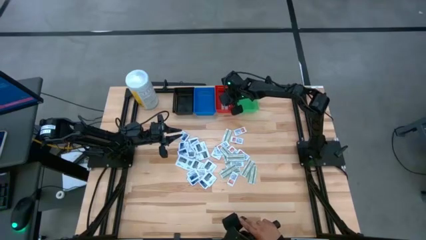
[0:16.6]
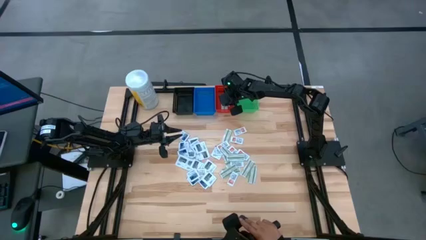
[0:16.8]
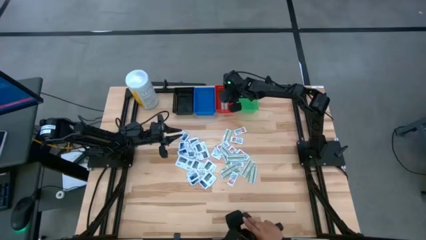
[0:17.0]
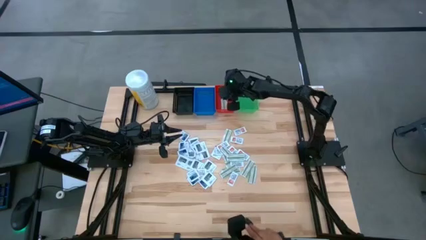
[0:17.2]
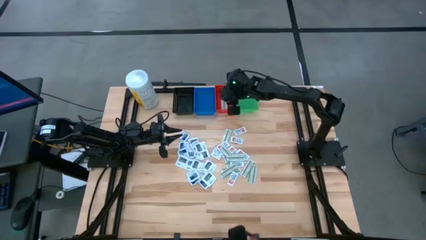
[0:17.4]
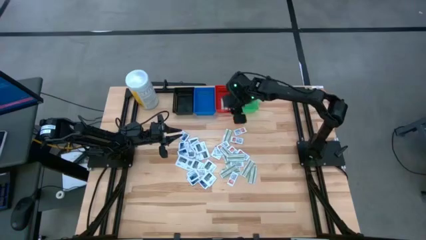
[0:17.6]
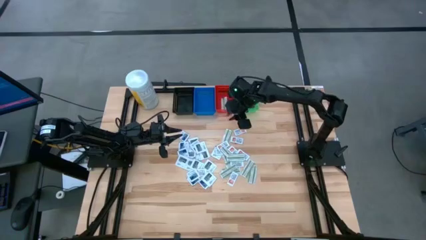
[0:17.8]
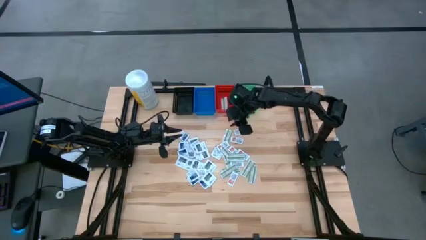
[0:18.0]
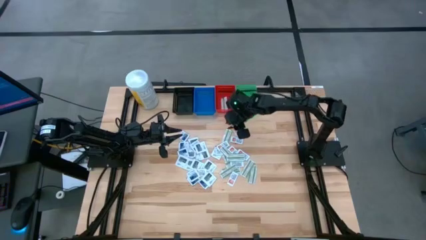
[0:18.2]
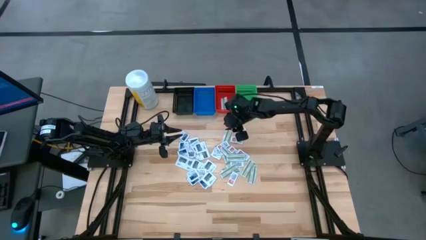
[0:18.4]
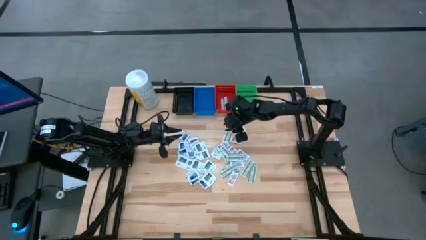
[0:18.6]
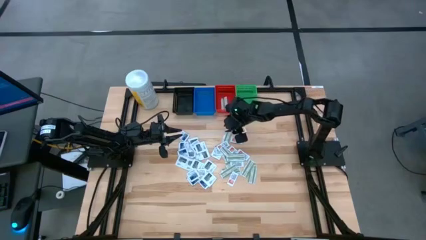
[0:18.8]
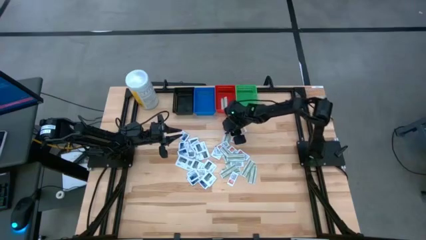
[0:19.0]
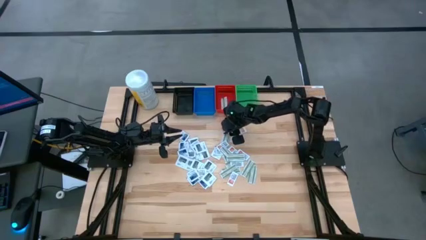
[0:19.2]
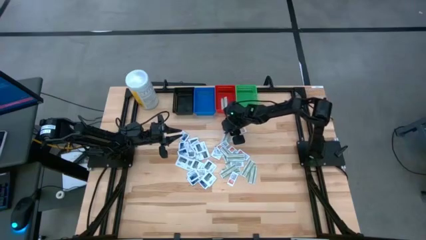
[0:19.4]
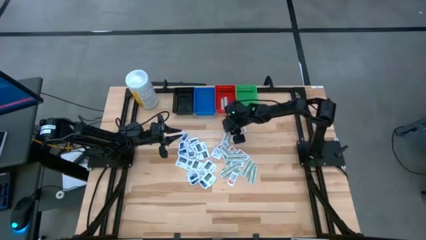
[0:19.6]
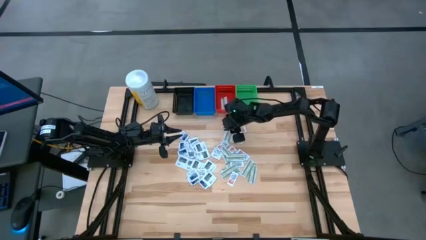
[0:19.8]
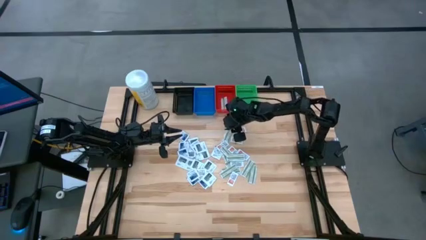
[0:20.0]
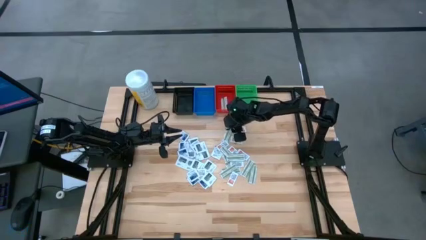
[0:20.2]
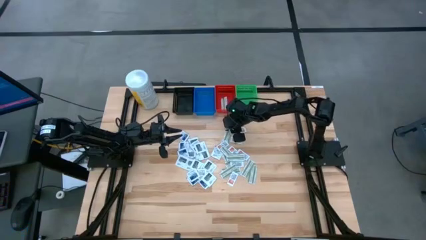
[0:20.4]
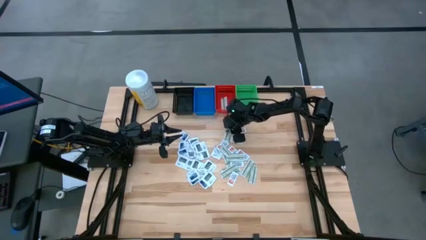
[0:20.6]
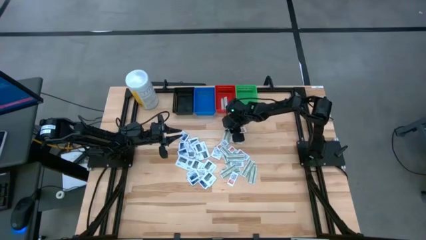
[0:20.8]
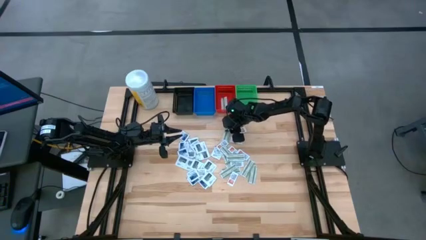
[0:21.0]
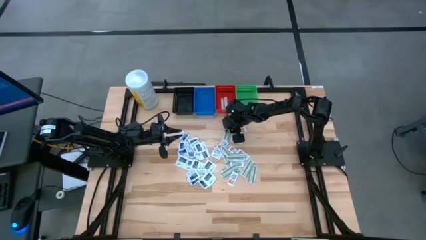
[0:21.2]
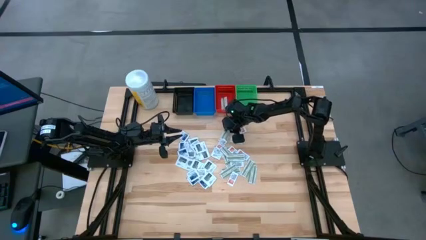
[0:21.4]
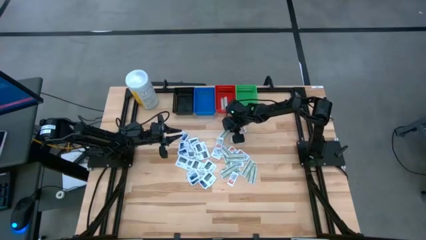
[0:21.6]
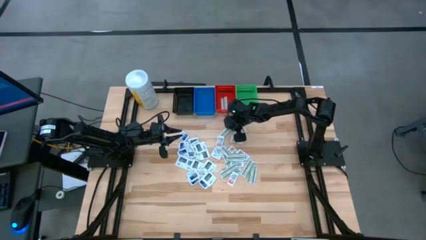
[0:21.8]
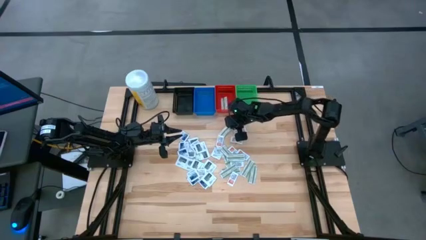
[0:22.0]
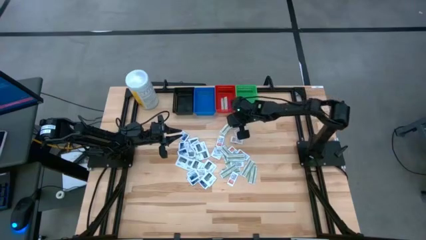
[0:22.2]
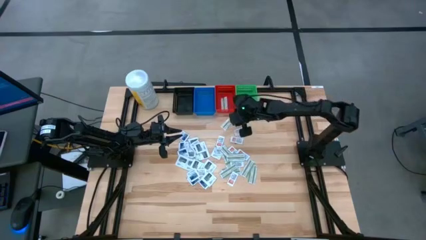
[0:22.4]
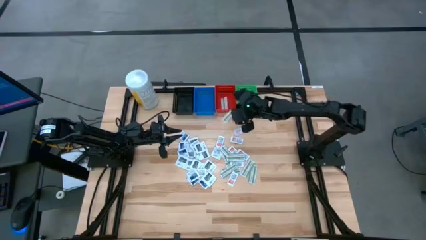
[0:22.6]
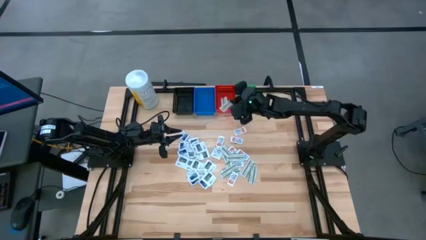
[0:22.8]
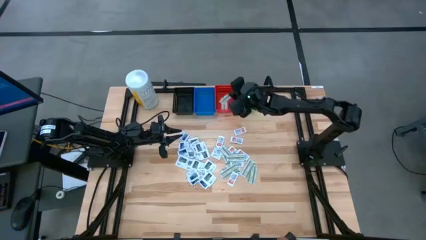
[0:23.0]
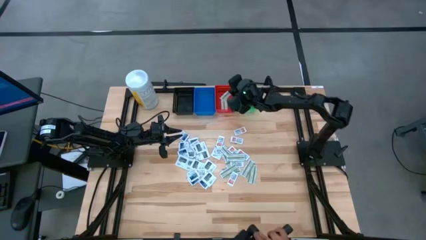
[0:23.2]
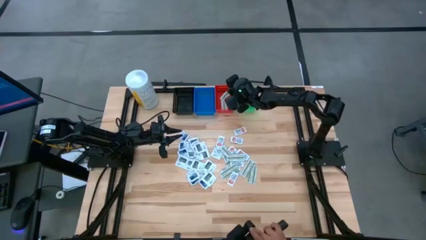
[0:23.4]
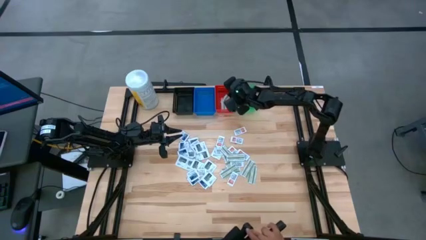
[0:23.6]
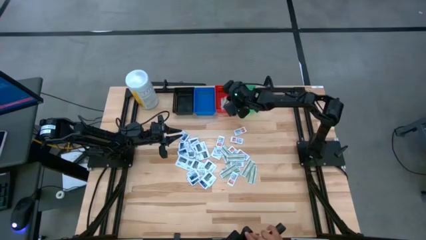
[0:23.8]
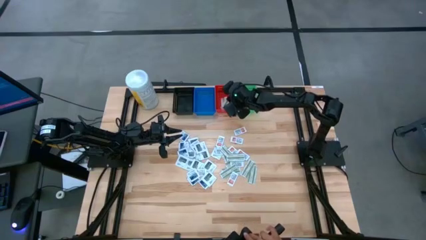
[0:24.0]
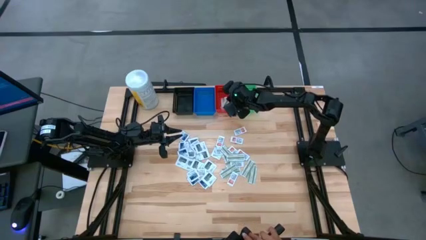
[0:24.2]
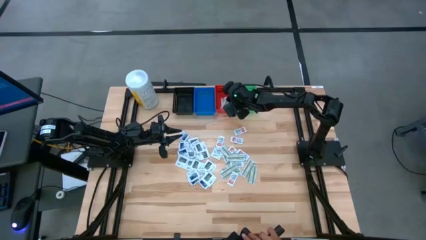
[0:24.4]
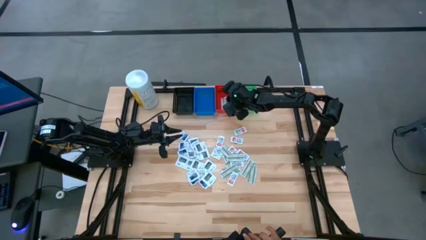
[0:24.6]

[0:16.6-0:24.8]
Task: Pick & Place First Aid Supplies
Put the green bandage pack into the red bin

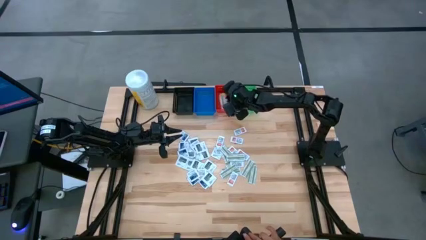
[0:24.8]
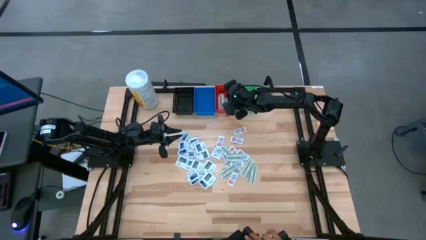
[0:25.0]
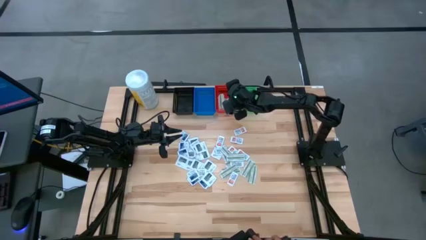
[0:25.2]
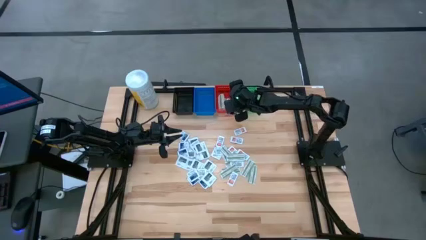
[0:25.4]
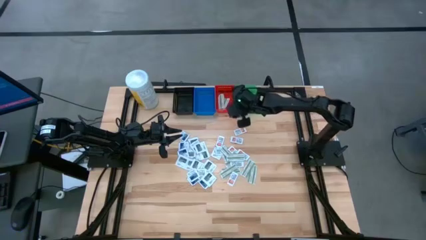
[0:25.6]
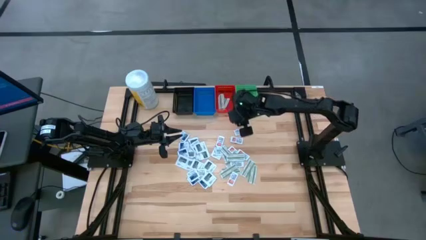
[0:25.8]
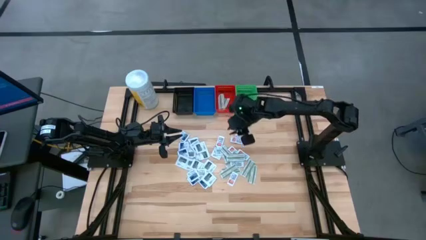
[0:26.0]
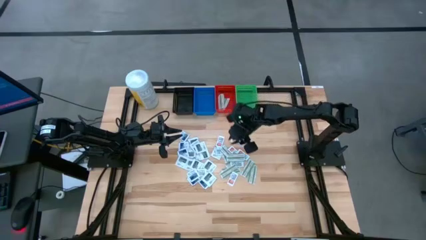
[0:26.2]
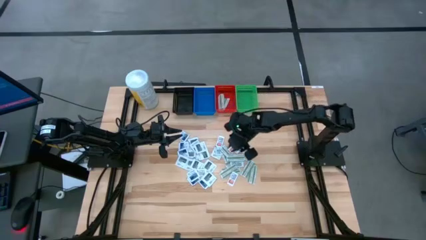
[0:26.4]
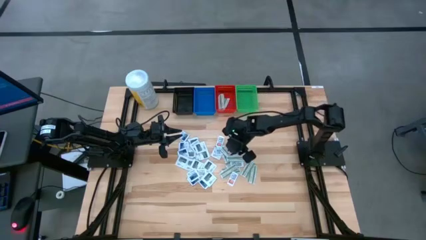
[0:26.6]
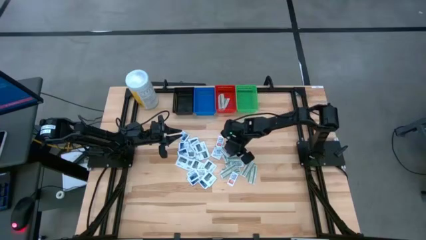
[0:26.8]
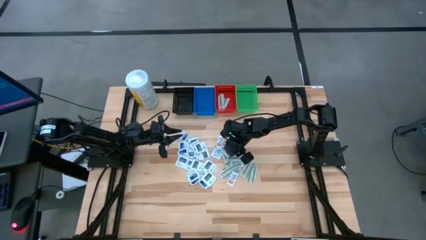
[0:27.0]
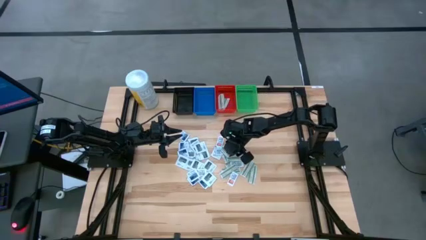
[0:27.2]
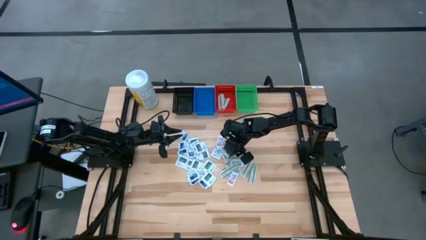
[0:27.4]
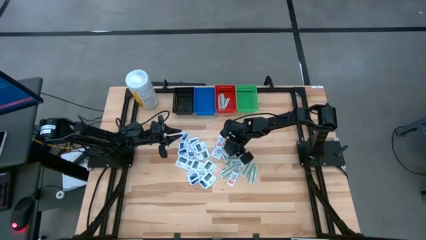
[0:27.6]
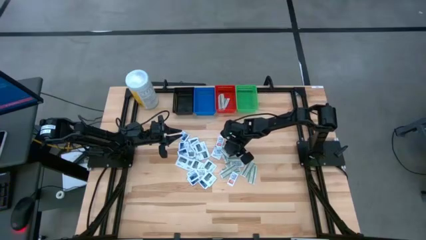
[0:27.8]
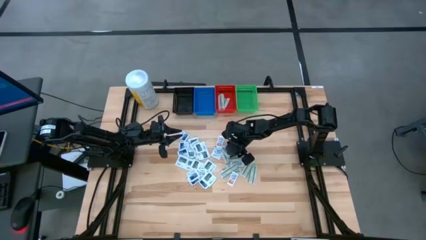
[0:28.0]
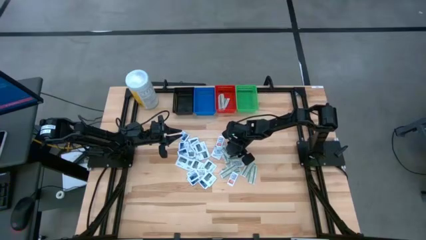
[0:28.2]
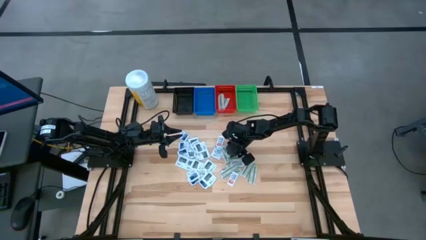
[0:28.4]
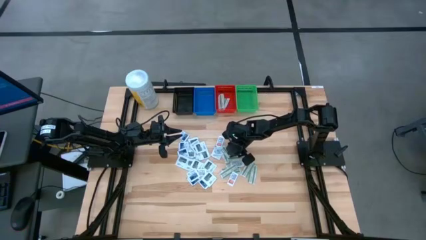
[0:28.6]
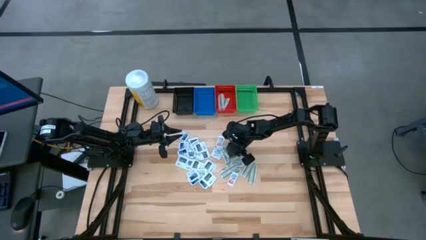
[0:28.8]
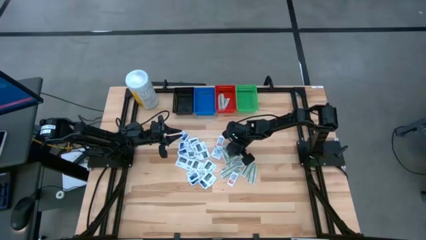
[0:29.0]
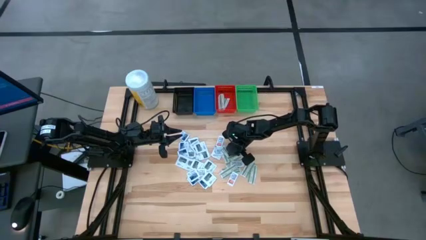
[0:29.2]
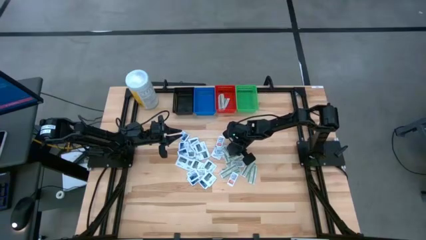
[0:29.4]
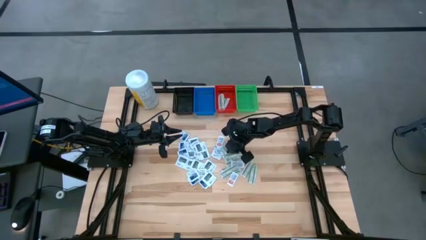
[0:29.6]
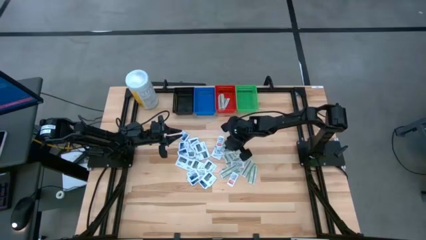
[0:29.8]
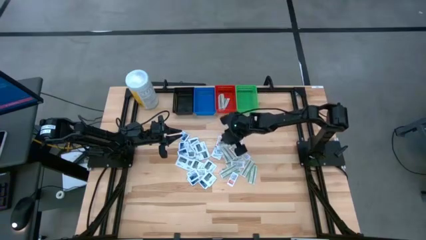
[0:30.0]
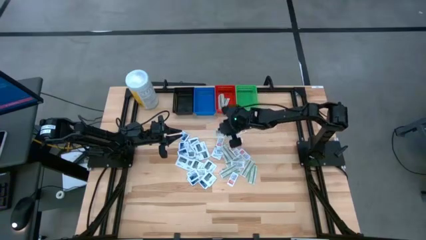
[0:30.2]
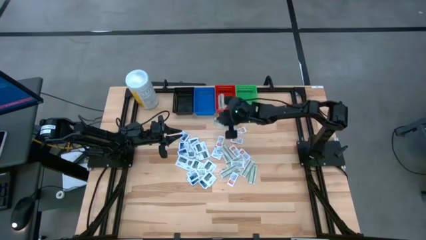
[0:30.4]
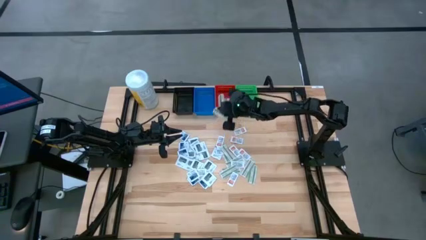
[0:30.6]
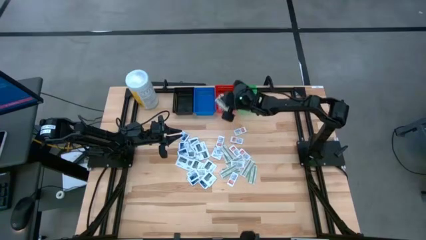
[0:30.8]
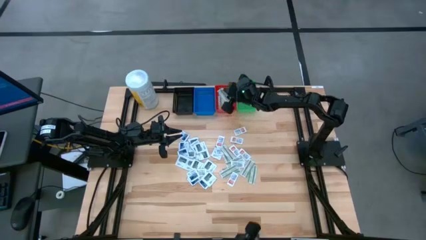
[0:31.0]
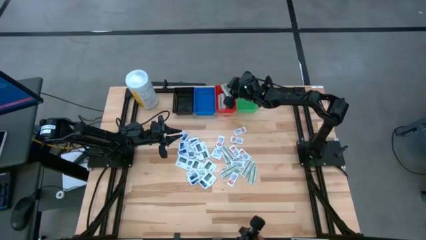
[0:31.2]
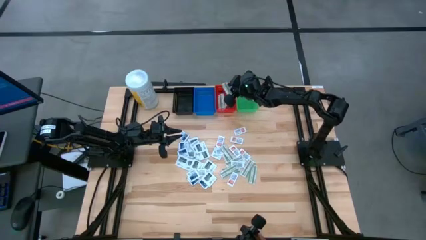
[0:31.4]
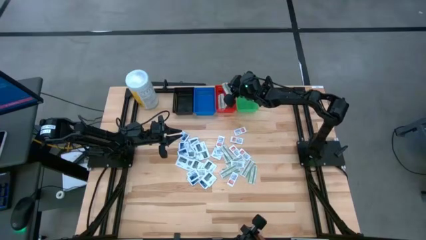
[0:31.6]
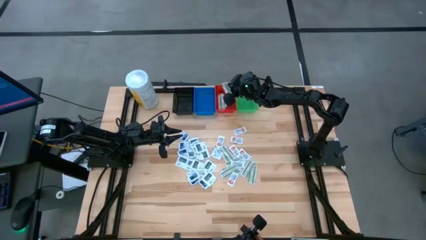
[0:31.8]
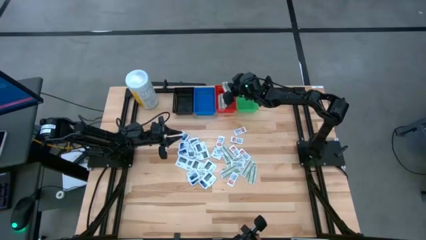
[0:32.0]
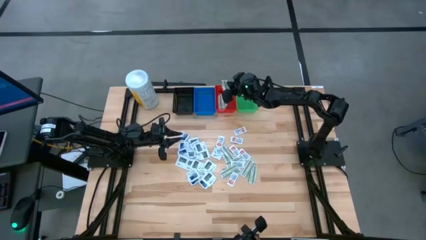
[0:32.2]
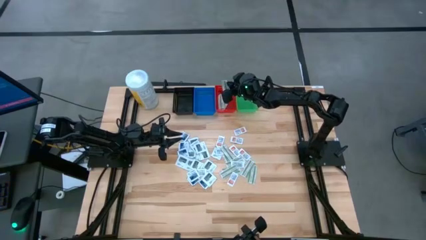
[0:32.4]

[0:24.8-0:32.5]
Put the green bandage pack into the red bin
